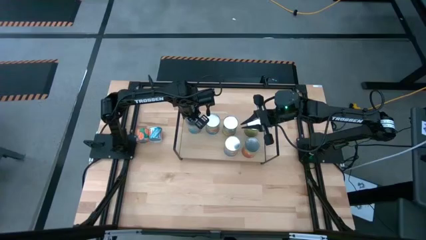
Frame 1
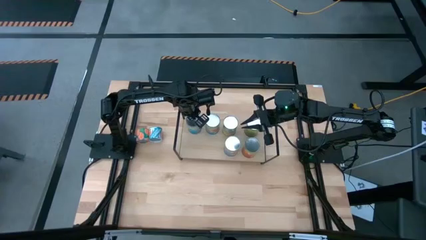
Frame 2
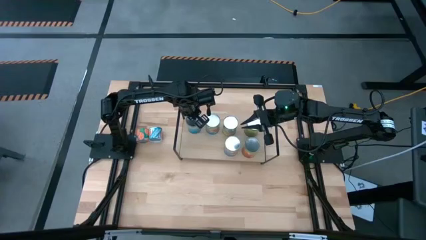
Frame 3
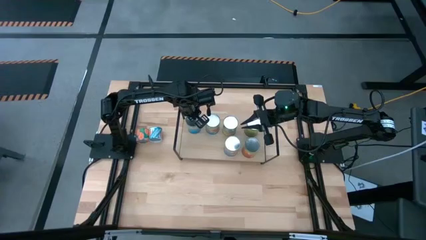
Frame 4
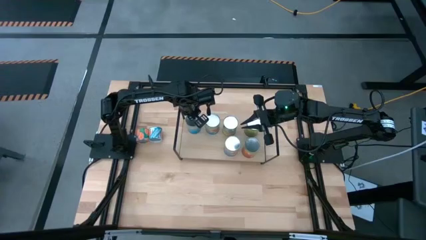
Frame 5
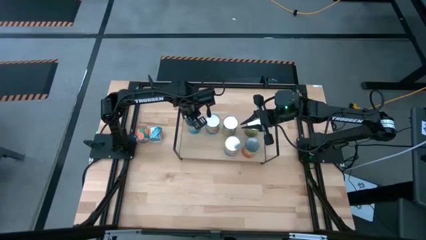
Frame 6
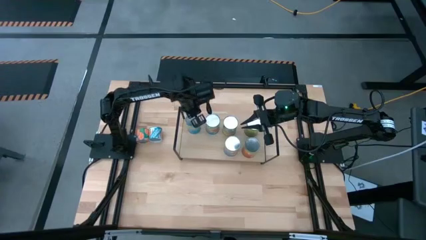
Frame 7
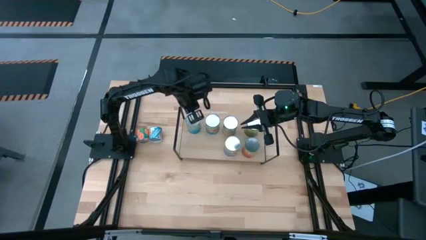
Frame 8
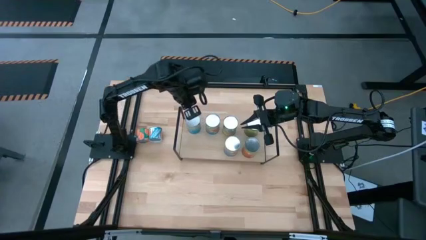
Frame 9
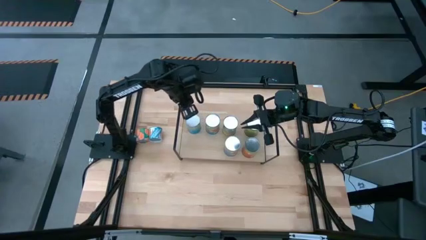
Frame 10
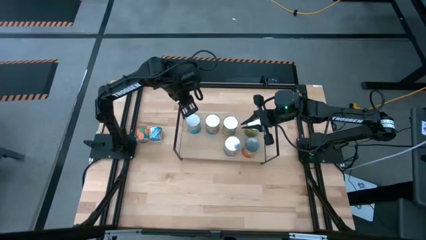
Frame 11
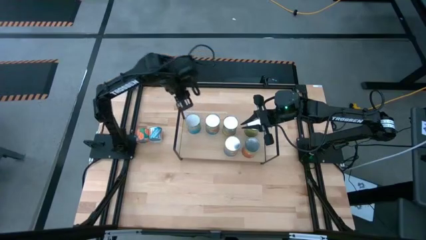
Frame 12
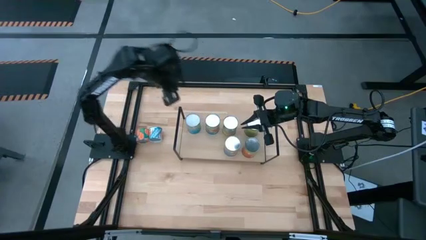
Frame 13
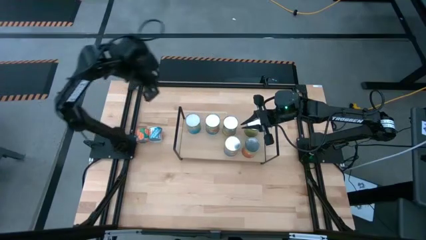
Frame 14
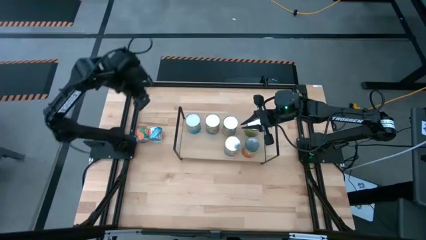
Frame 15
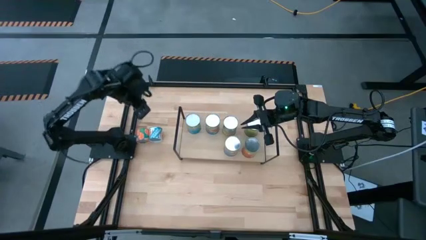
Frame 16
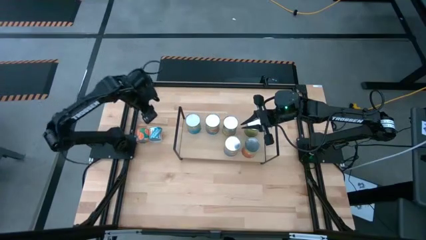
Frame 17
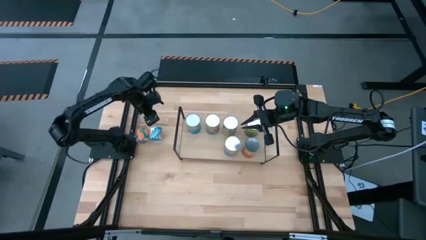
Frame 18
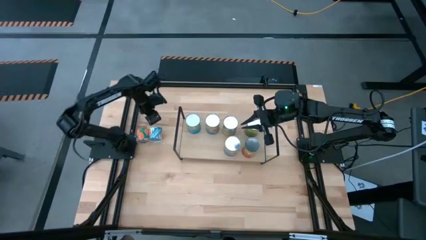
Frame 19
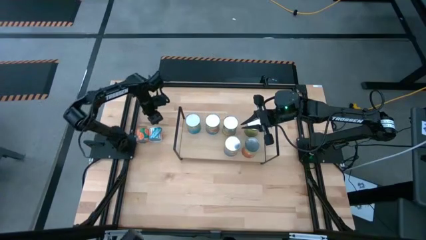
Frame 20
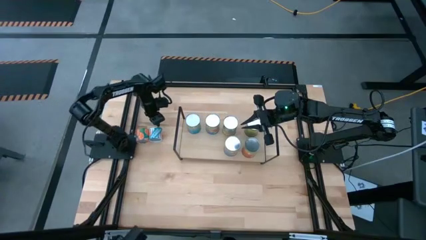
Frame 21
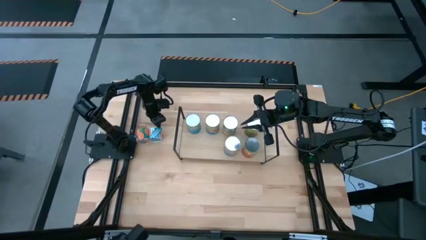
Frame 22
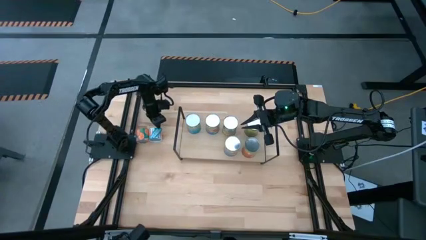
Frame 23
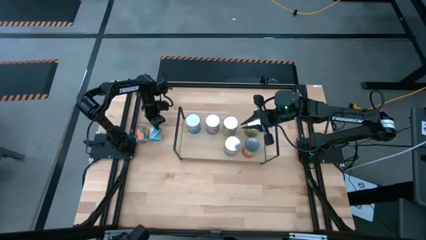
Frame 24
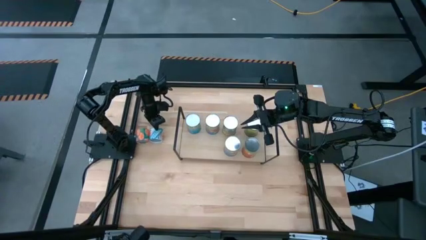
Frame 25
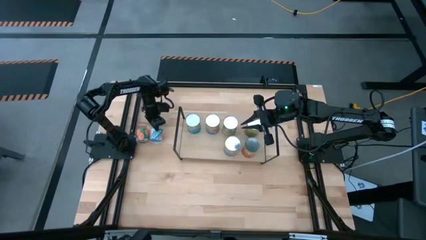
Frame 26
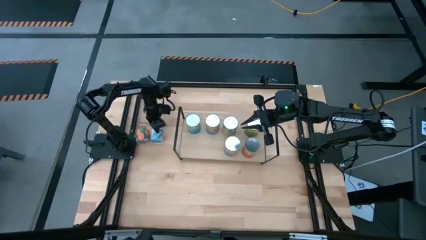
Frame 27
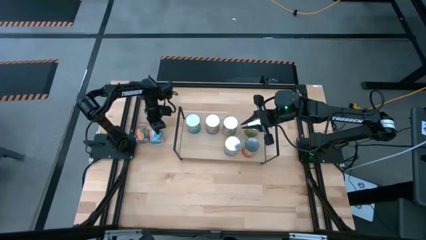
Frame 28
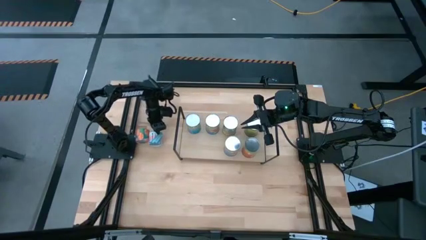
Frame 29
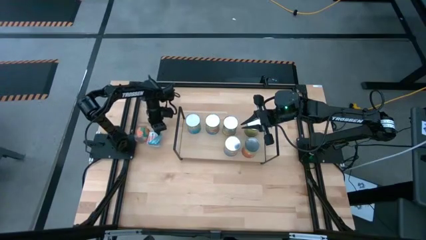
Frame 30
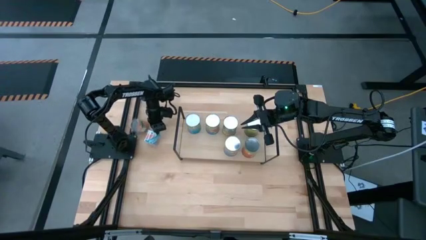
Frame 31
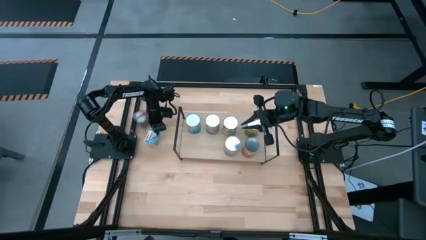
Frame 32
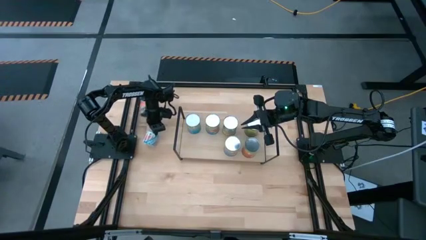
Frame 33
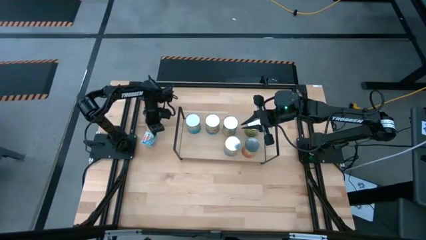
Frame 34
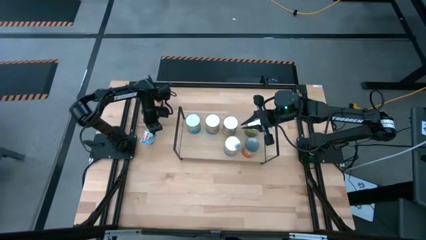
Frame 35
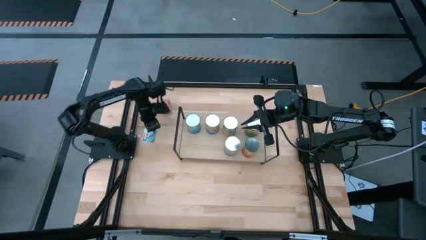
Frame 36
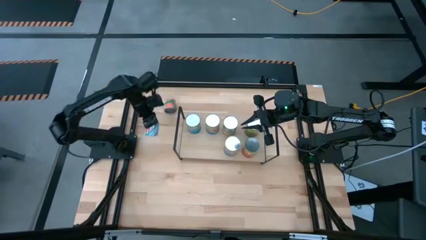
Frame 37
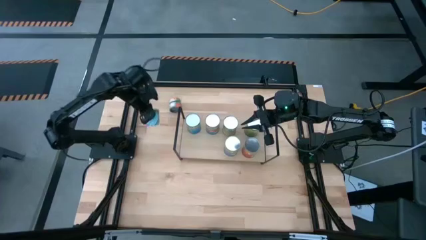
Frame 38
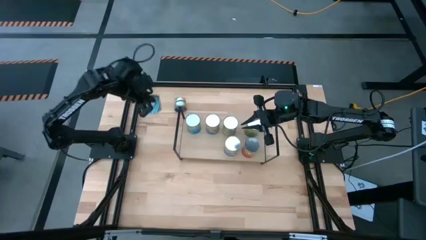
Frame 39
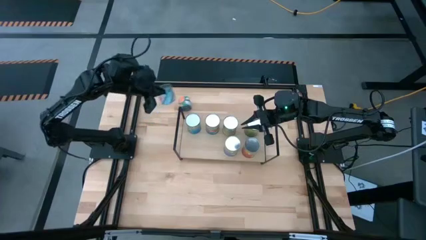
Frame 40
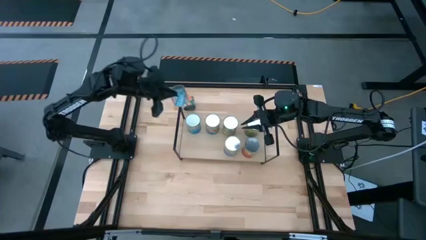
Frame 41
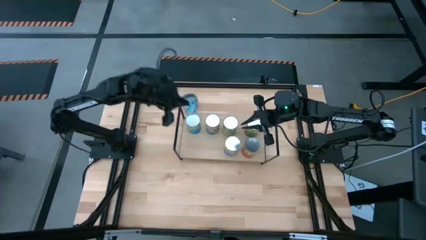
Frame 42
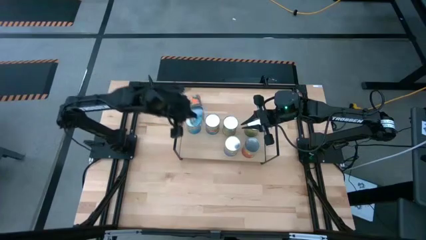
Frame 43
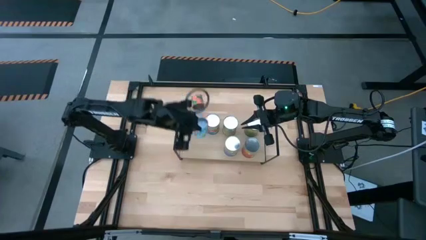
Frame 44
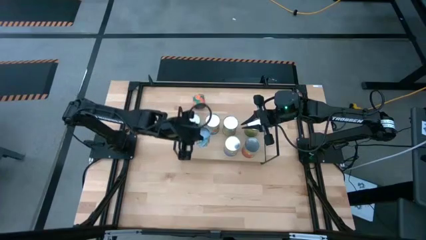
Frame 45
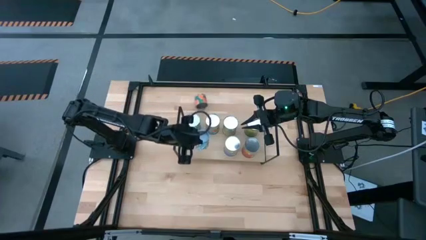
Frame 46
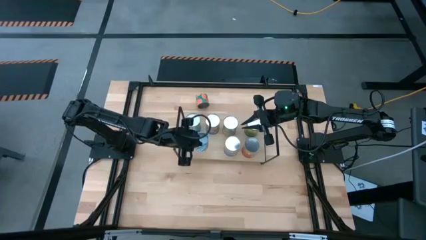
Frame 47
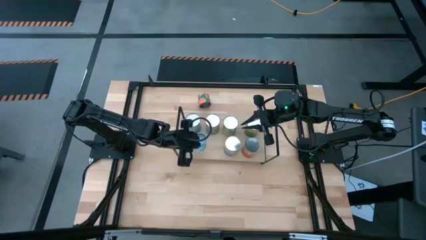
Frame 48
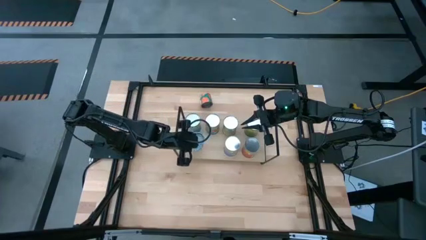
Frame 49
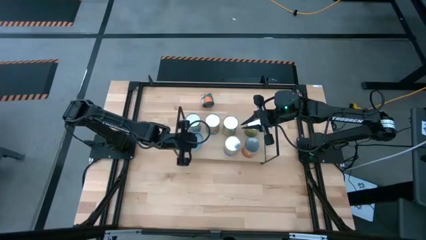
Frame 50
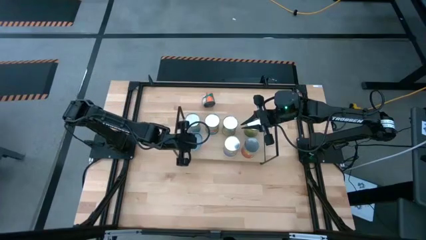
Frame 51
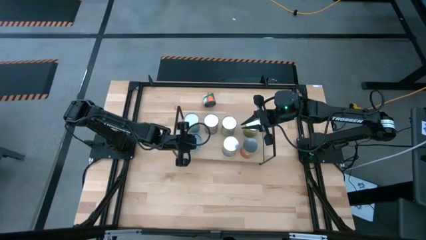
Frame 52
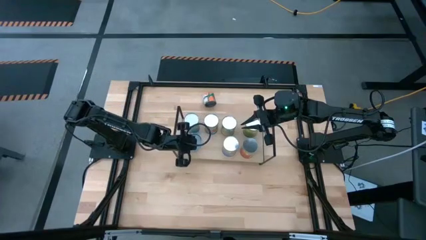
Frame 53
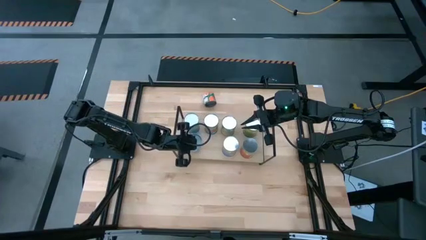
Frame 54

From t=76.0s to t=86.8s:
Task: Pick and place cans onto a shelf
Put the small canned carrots on the shelf

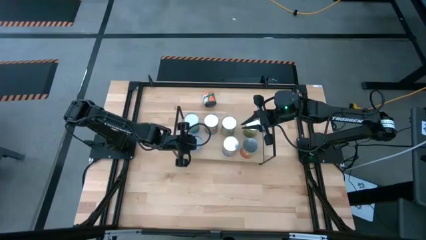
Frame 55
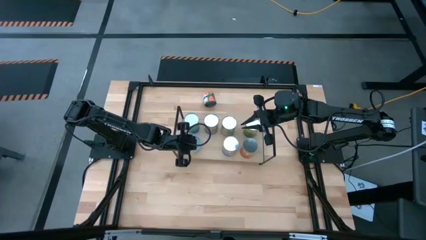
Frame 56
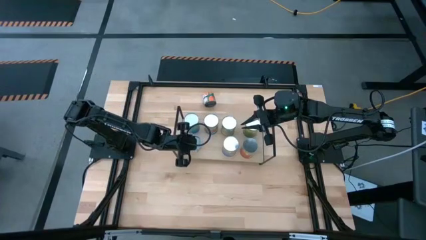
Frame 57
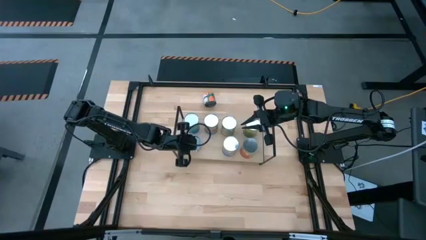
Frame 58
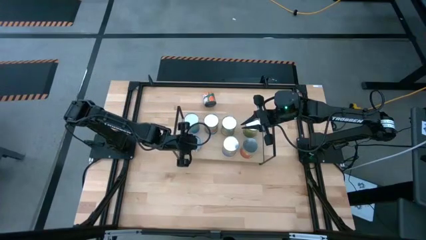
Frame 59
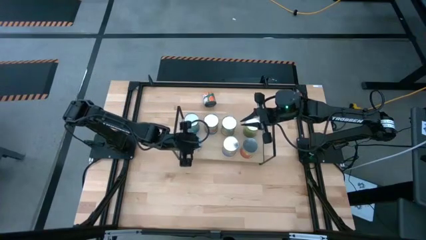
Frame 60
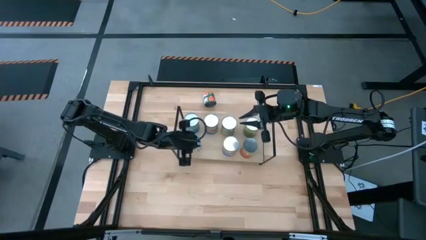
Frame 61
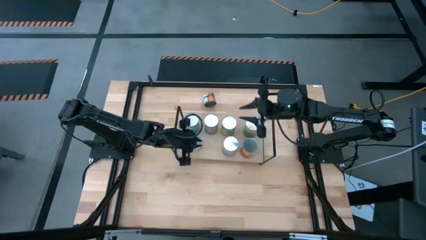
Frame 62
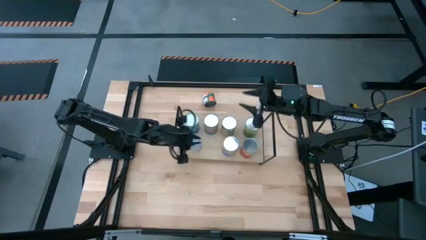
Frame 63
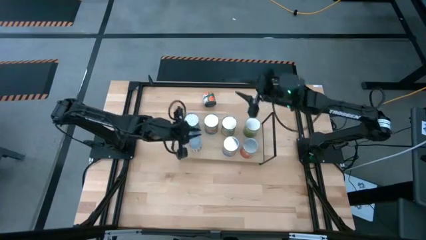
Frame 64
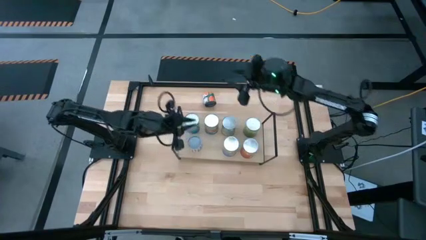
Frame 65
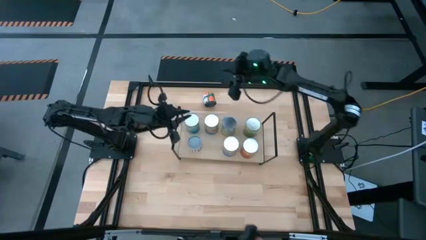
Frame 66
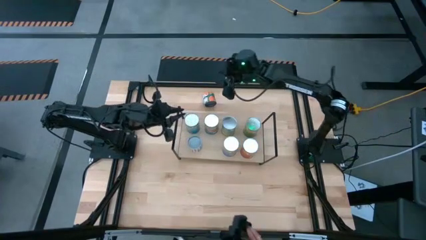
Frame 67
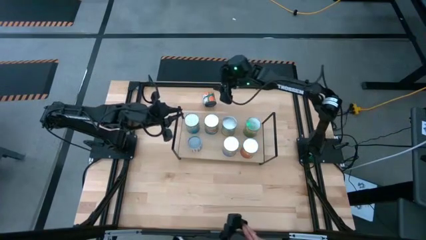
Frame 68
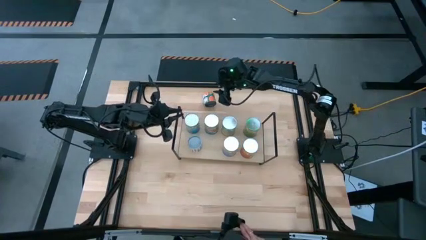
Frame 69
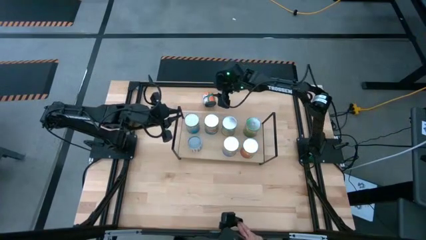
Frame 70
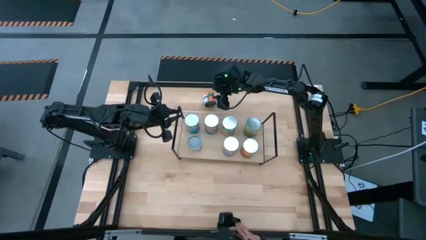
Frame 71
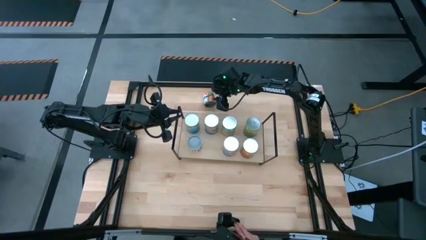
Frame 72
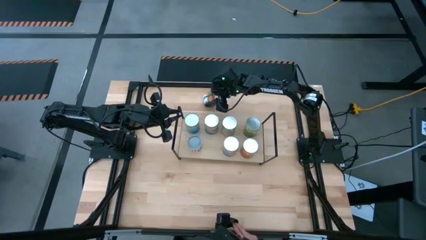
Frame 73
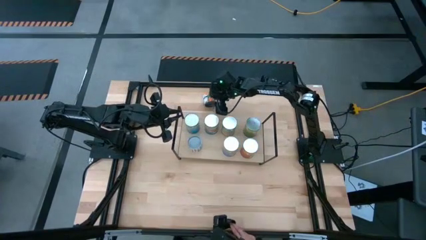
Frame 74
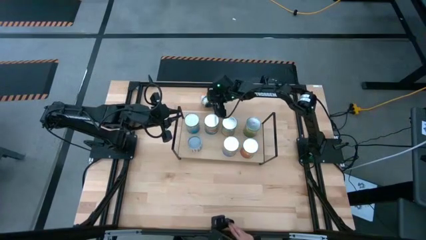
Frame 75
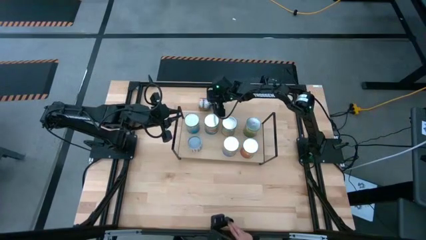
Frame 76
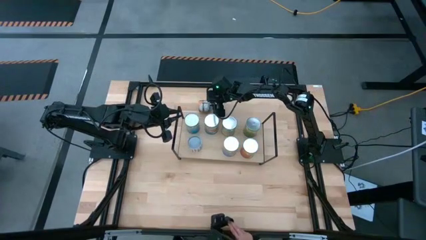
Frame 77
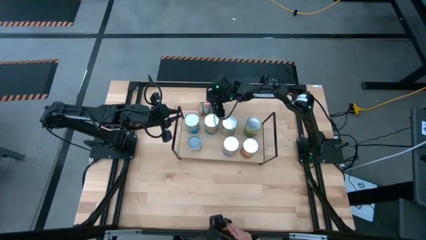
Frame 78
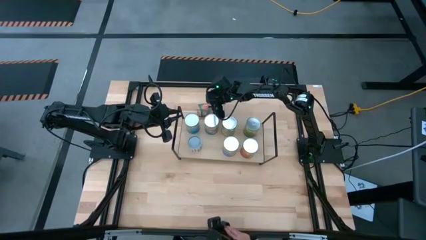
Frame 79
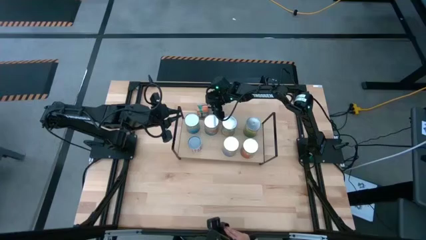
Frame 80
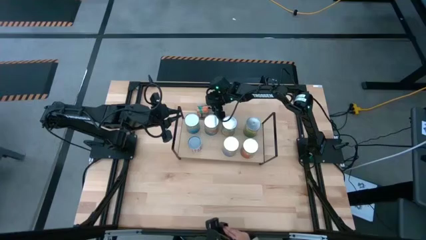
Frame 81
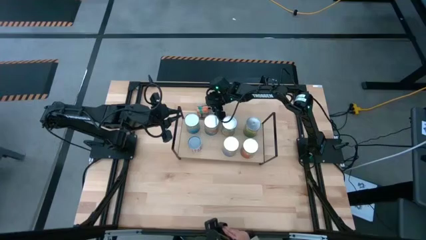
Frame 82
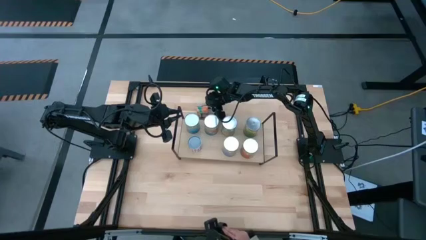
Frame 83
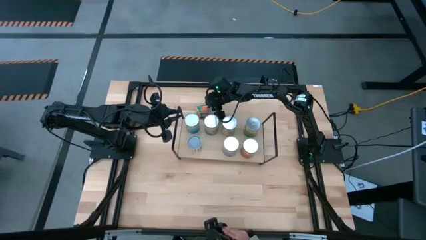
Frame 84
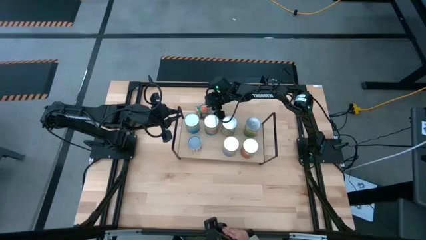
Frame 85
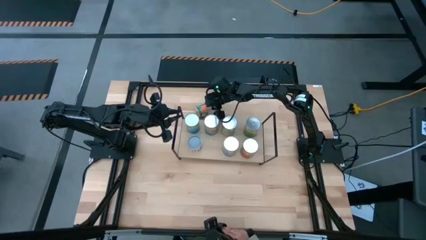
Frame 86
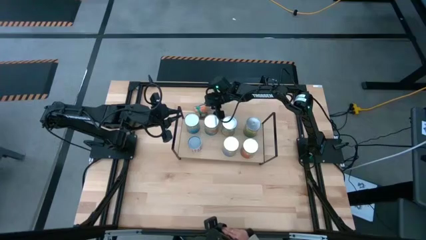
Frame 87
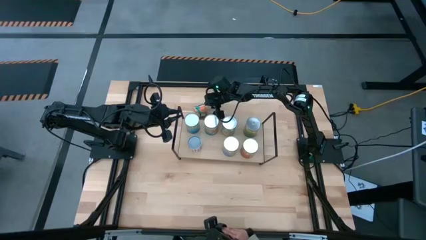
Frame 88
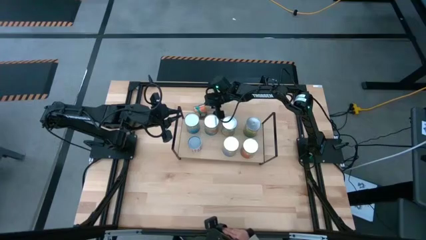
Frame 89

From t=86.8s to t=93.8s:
Put the small canned oranges on the shelf
